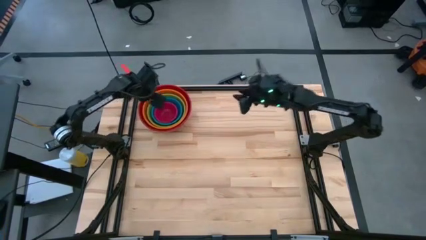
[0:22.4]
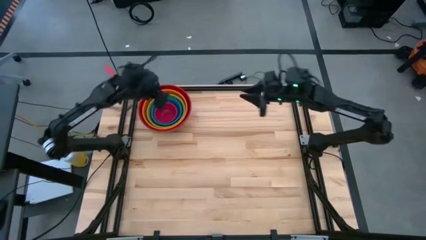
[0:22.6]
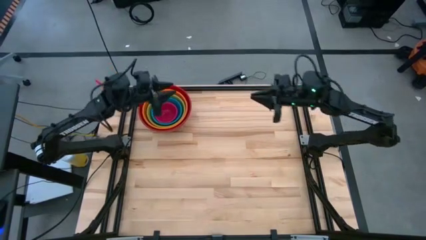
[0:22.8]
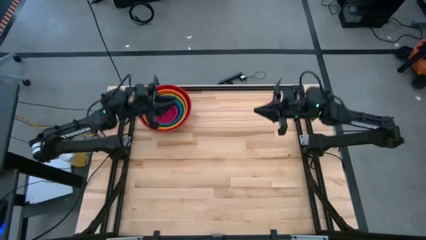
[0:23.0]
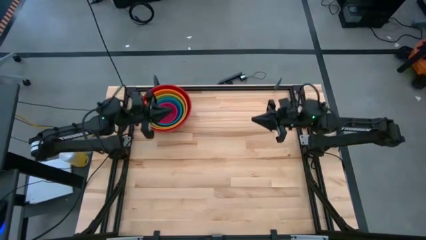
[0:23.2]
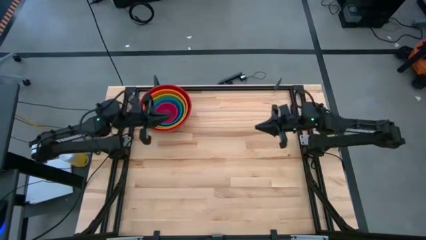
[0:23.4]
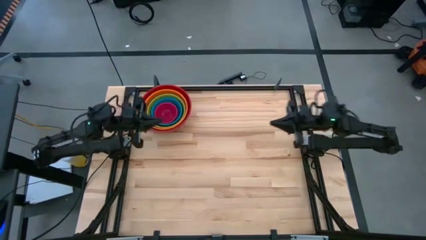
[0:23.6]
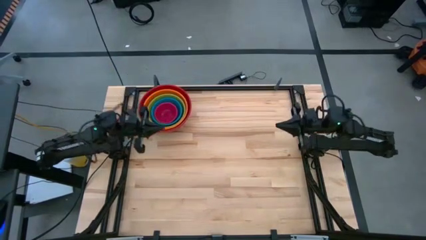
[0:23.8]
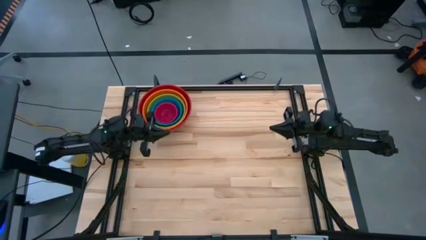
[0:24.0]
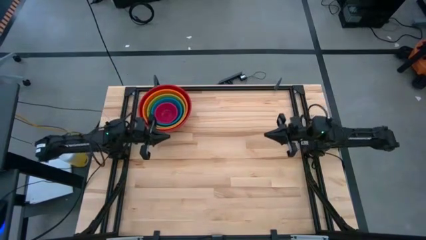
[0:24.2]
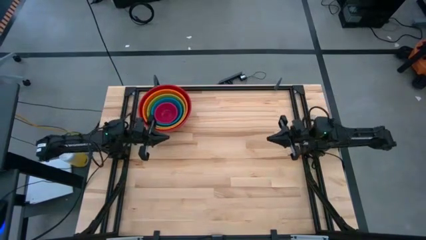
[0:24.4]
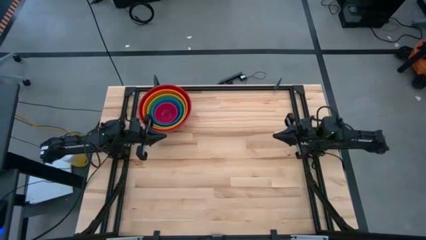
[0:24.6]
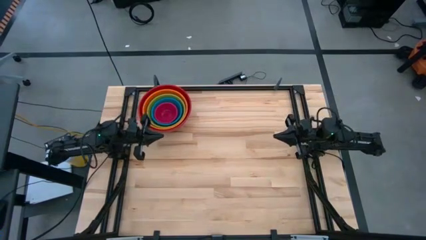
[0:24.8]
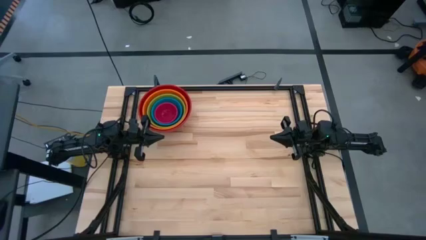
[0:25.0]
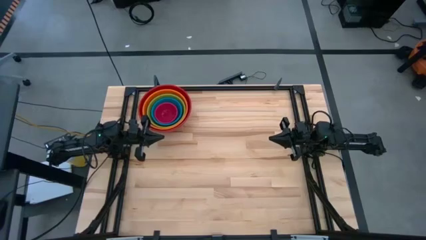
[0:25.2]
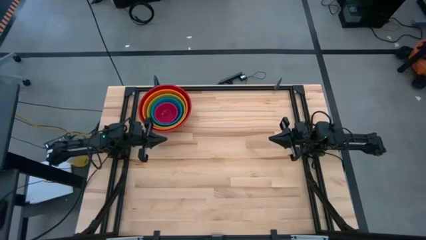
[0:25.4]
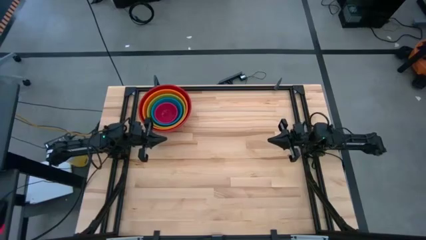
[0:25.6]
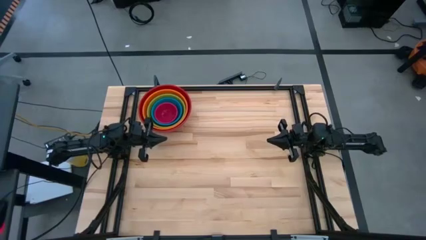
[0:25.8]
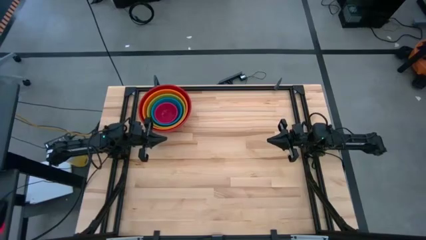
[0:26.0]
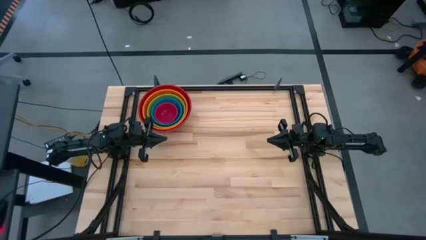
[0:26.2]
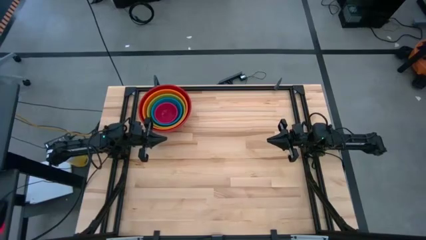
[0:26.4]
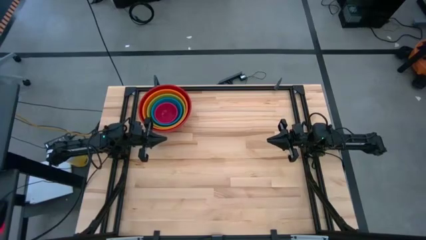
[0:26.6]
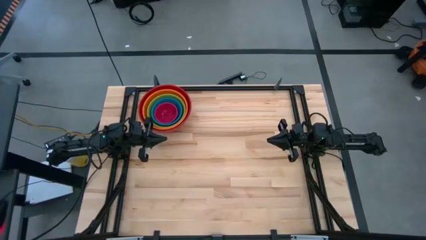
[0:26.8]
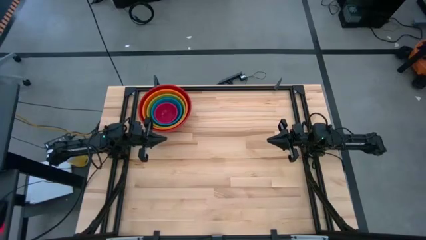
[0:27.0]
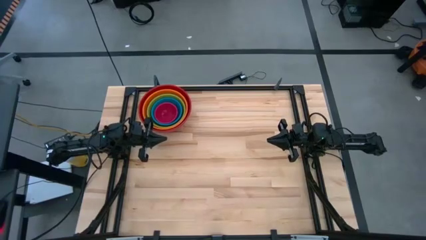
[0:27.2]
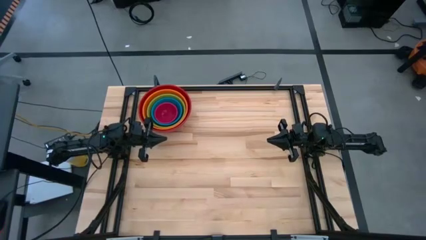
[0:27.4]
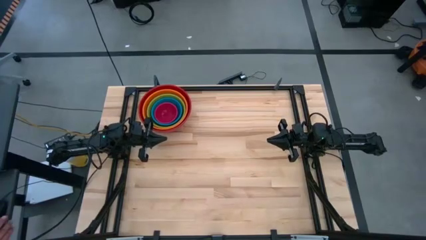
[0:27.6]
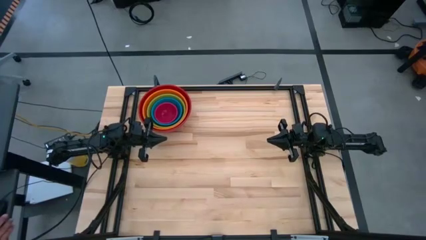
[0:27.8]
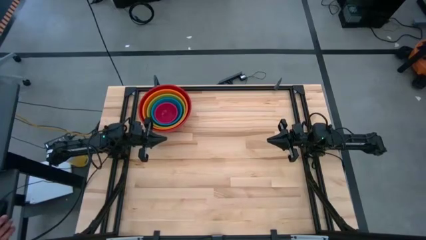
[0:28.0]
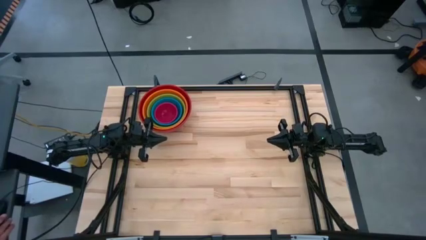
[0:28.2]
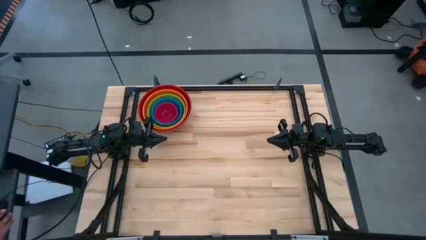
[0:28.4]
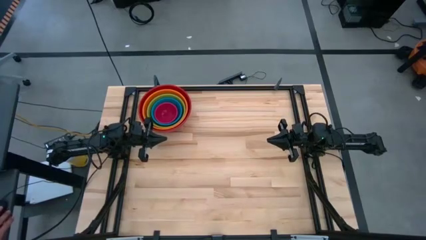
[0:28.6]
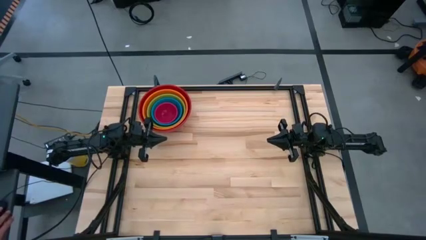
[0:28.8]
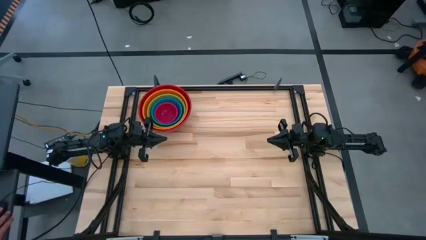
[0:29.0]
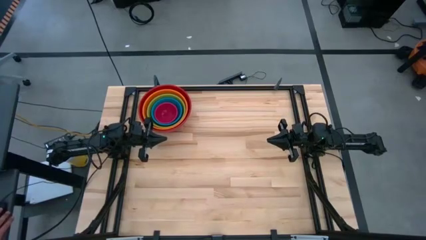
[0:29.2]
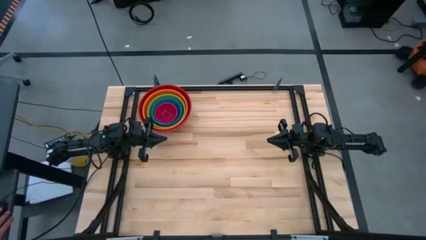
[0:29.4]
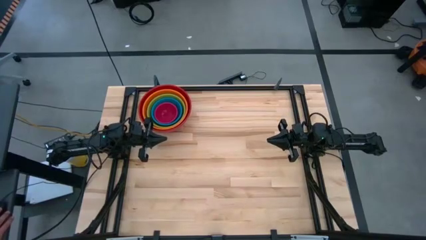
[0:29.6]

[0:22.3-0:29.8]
Return to Home Position
